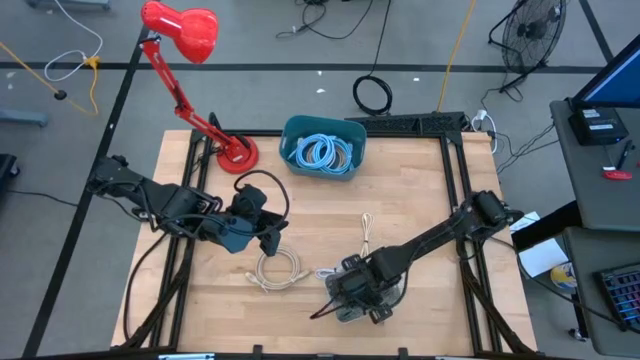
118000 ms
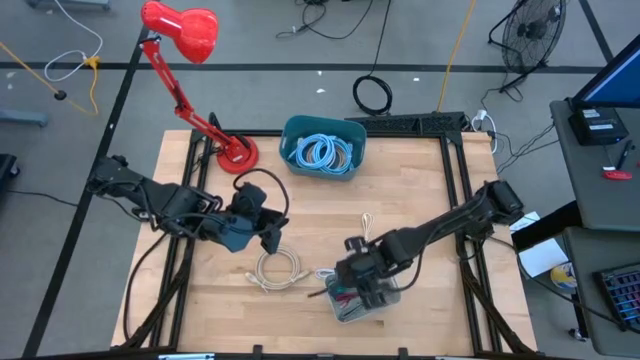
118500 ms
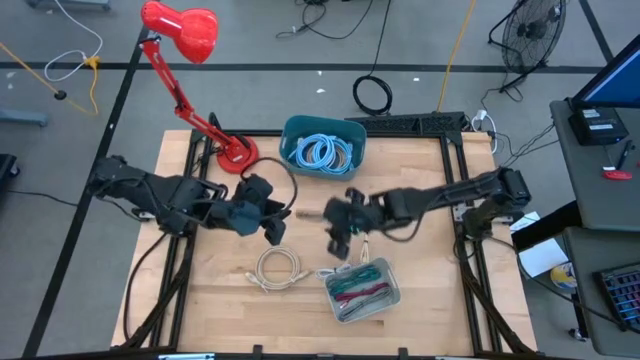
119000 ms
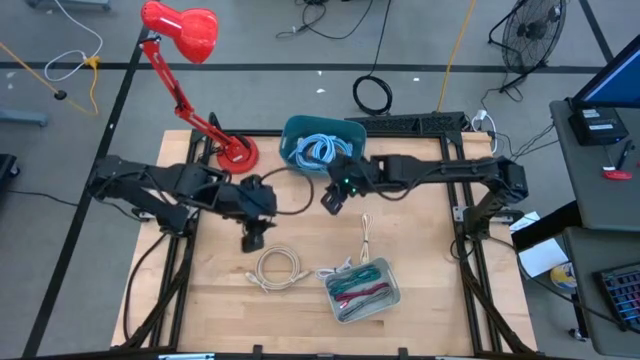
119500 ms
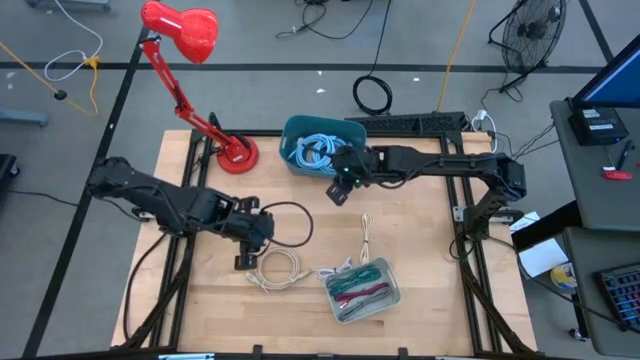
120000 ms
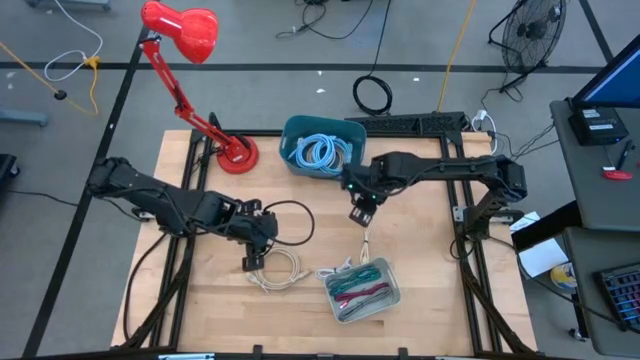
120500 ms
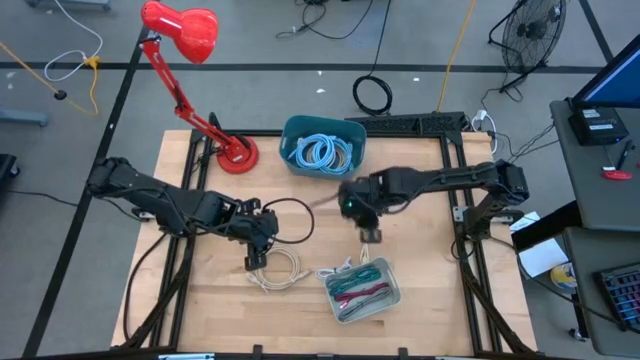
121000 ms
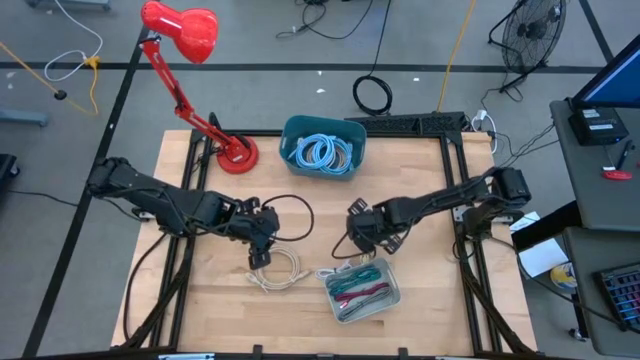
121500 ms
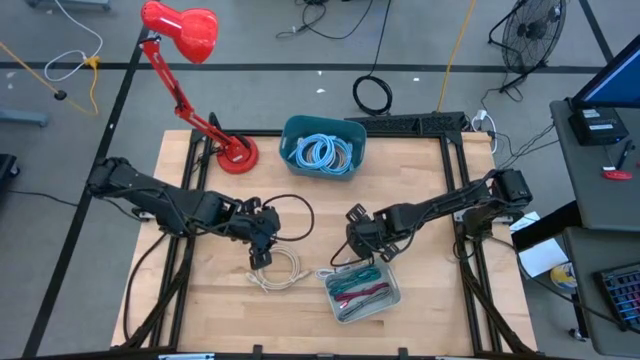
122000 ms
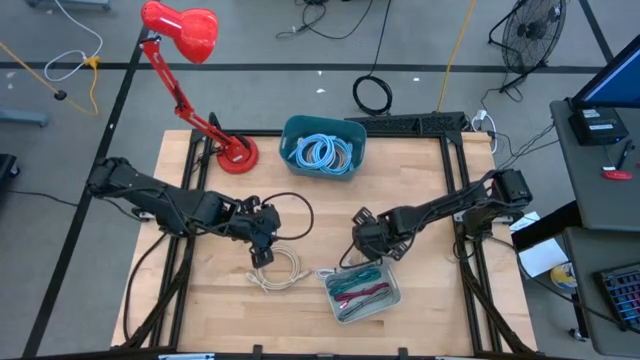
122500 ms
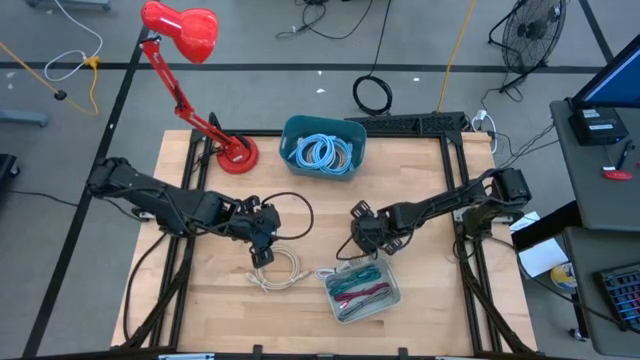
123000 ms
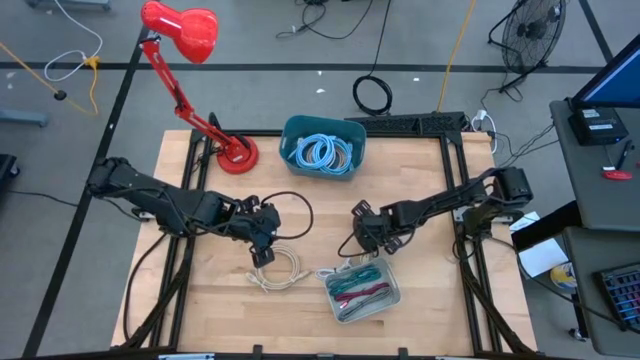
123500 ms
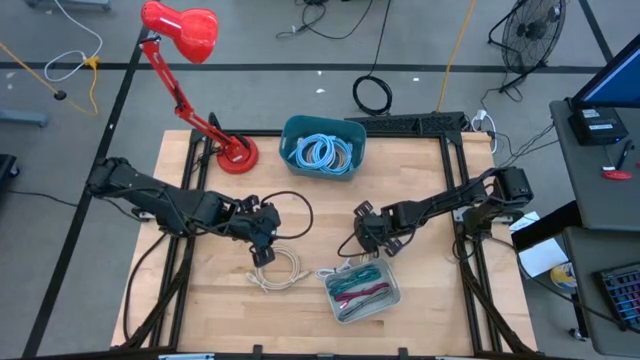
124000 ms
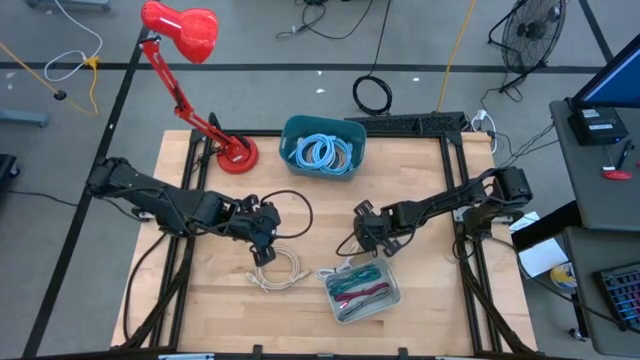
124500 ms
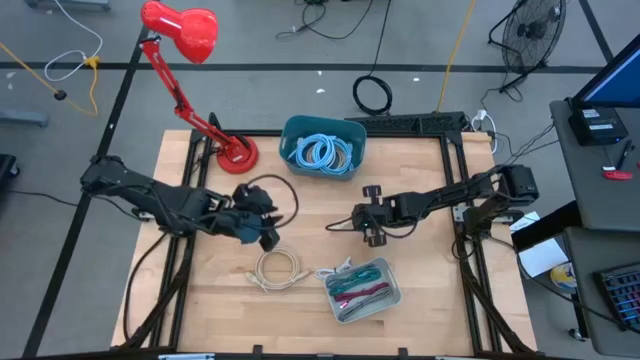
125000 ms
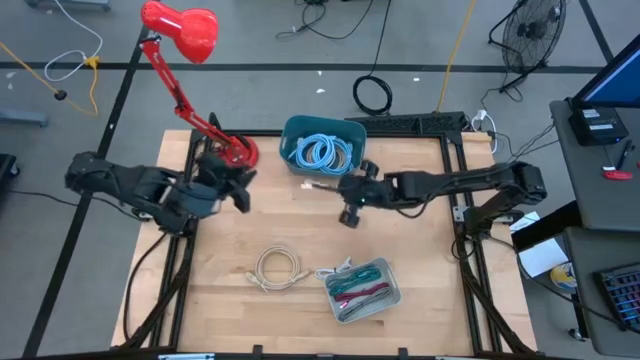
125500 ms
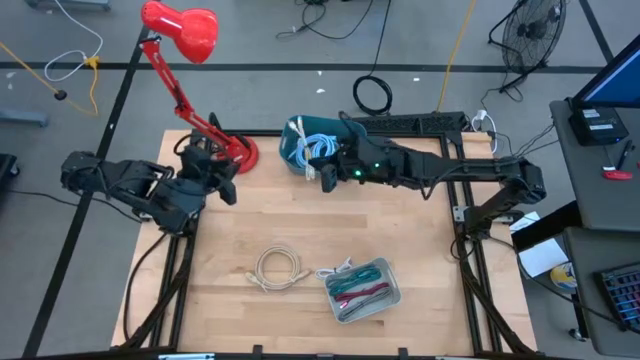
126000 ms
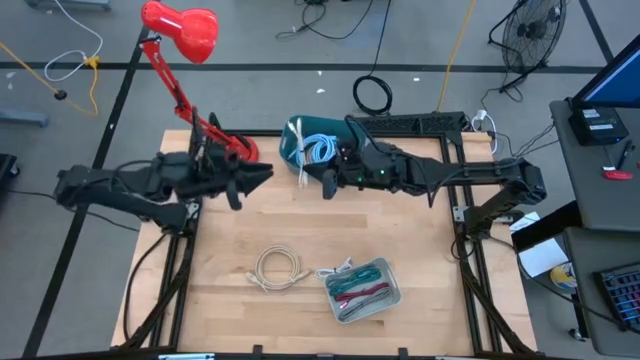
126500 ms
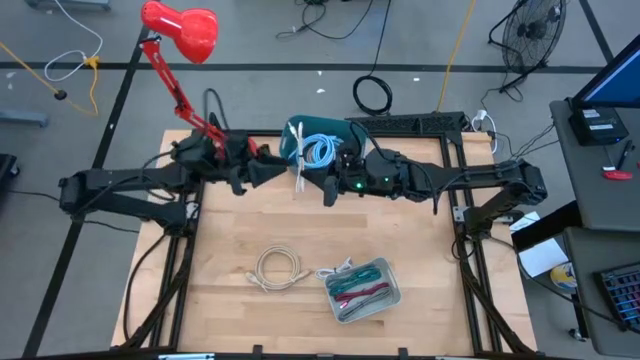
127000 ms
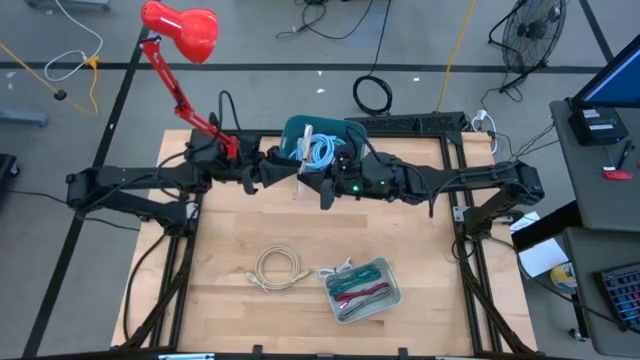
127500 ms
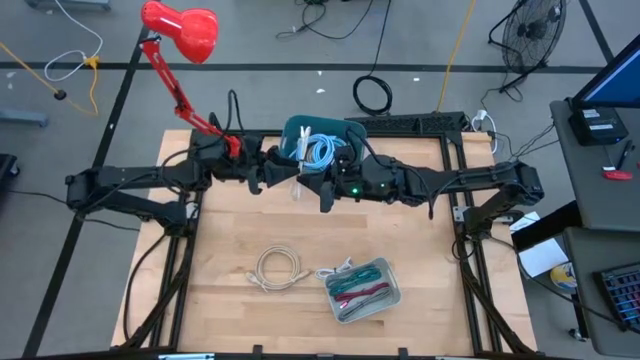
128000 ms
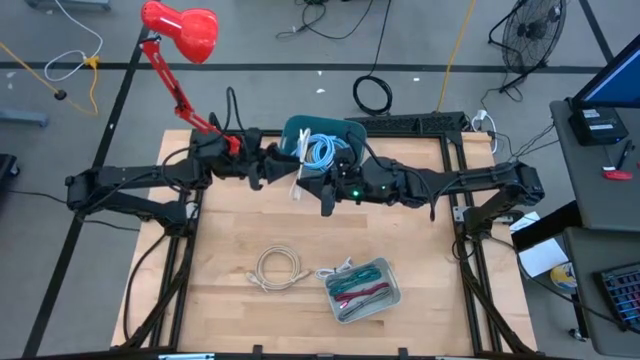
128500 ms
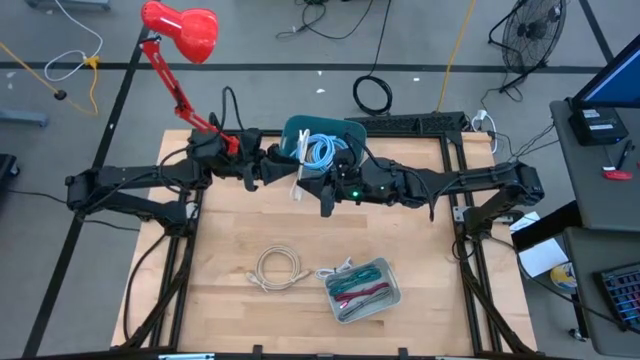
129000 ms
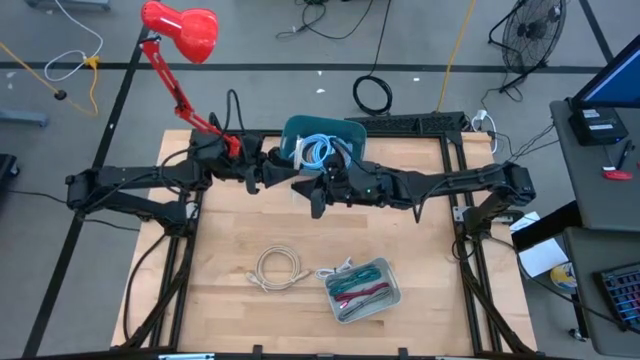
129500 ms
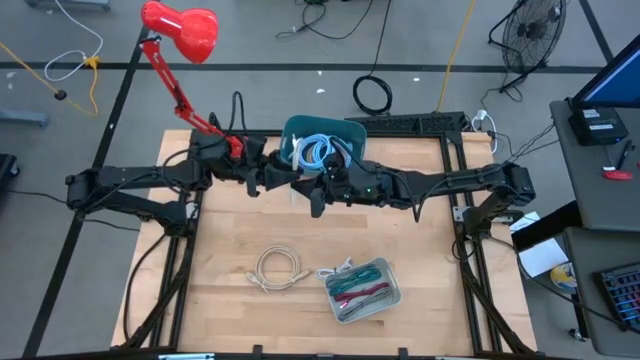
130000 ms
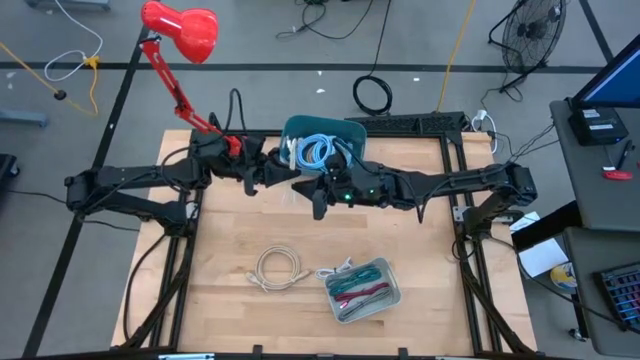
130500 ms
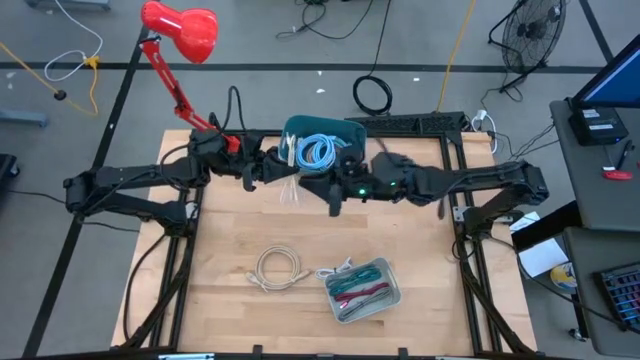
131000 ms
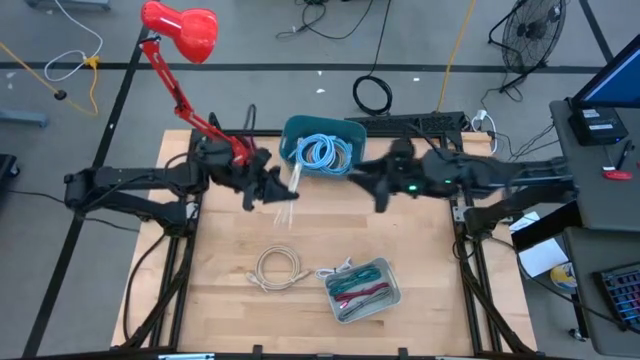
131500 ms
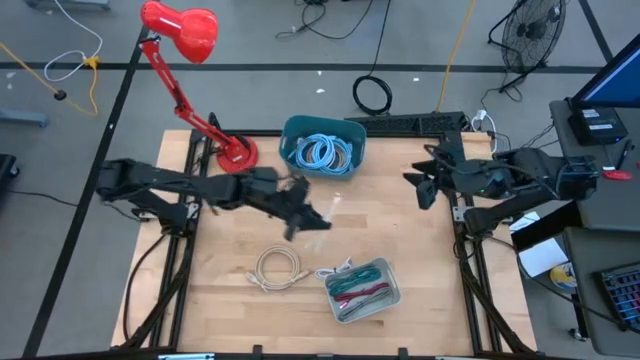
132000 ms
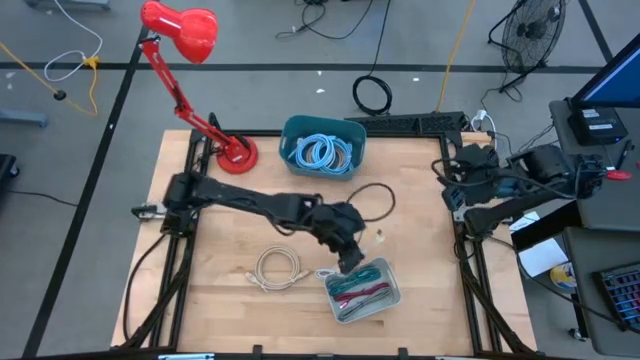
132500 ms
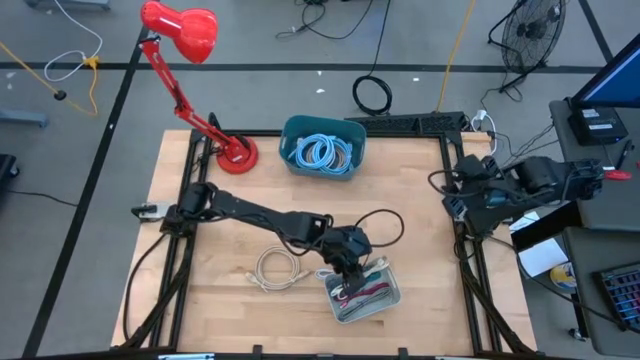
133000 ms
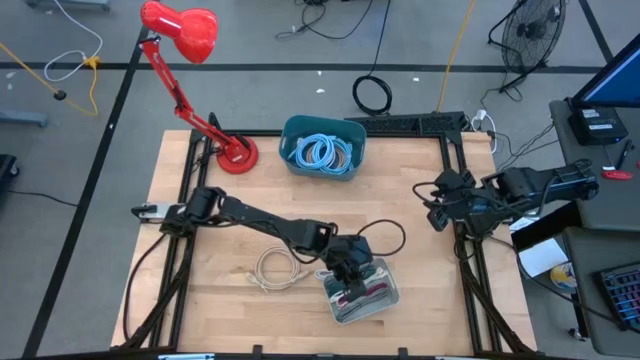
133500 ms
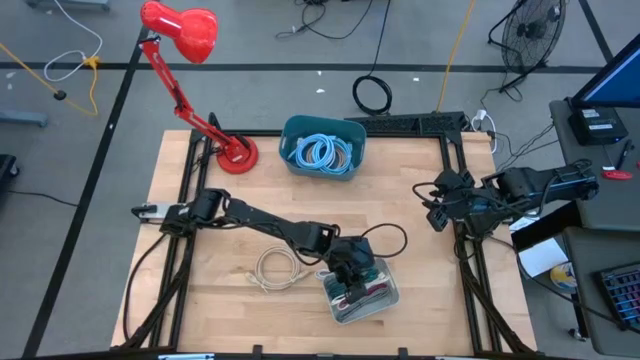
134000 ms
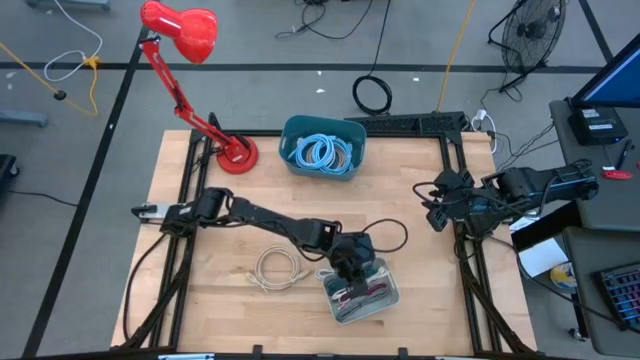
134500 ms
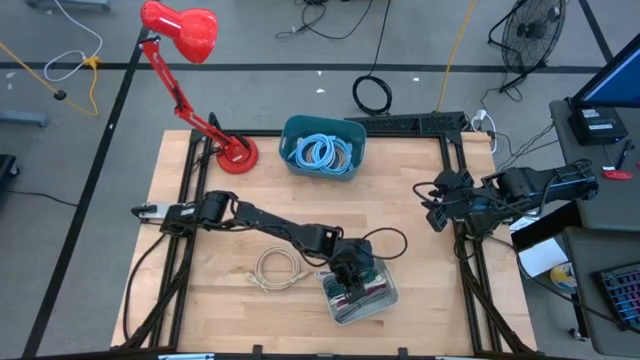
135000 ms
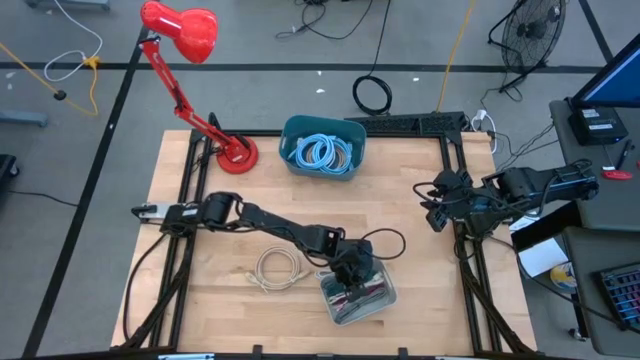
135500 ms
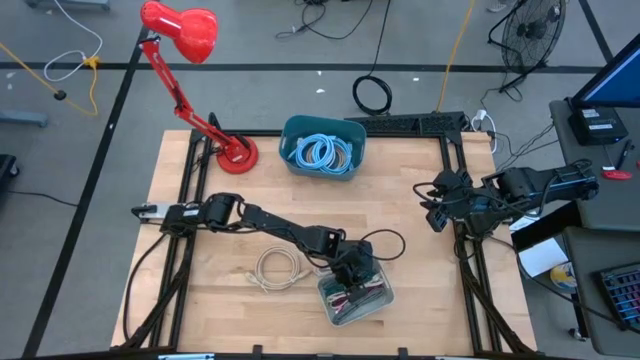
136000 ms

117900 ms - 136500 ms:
Task: Pick & Place USB Port
Put the brown charger cable into the gray bin

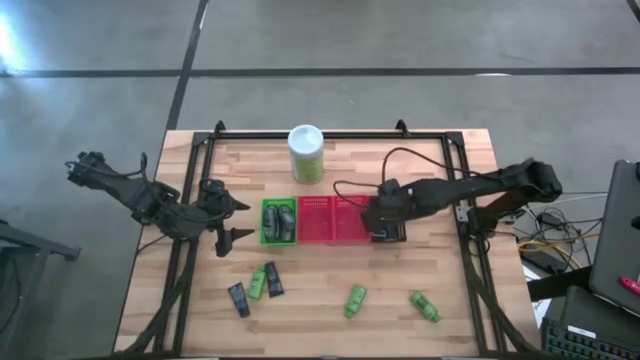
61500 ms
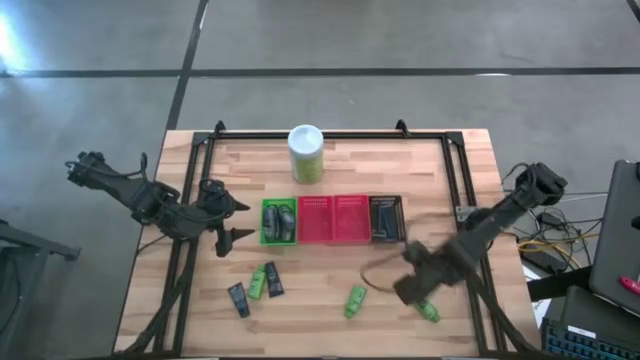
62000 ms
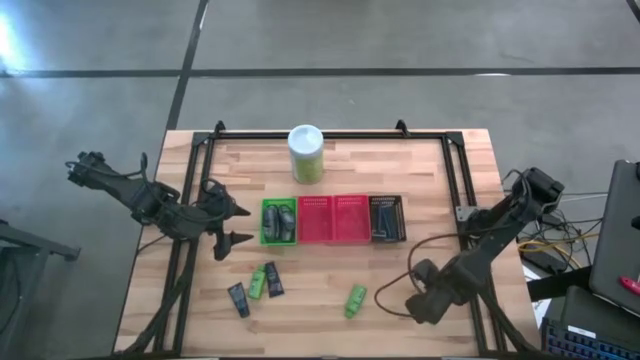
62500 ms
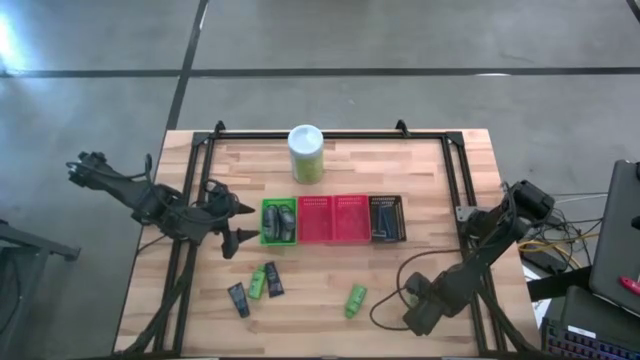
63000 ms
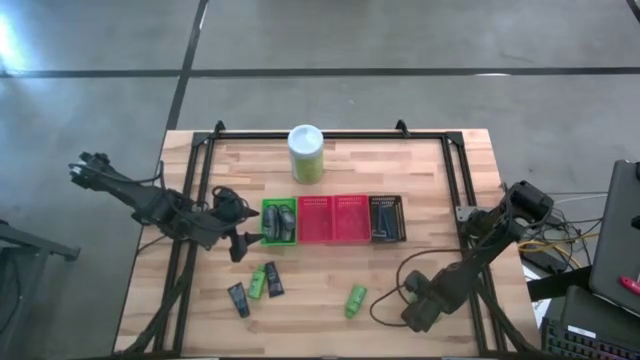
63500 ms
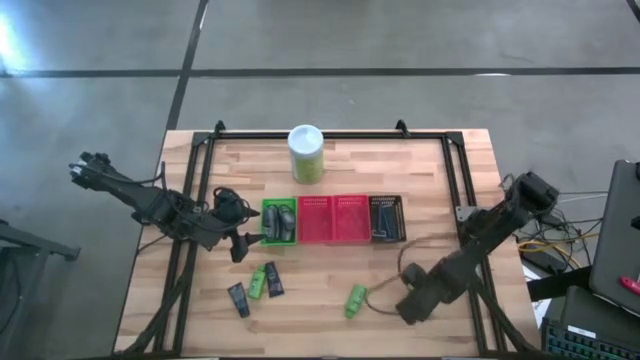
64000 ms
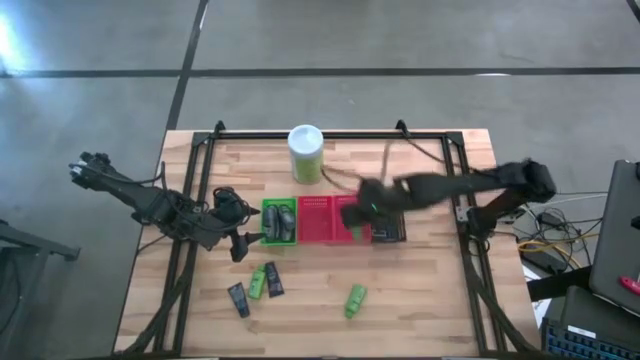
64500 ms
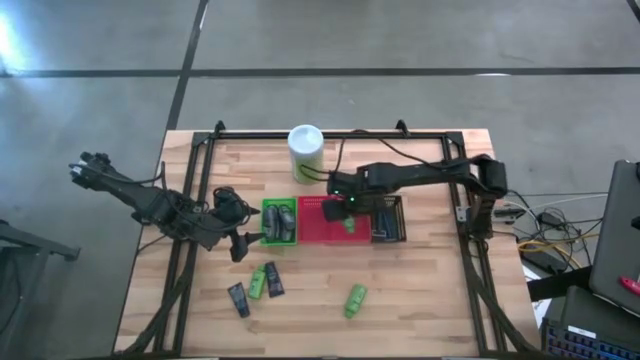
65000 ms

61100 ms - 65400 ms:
Task: Pick & Place Travel size toiletries
Put the green shampoo bottle into the right red bin
